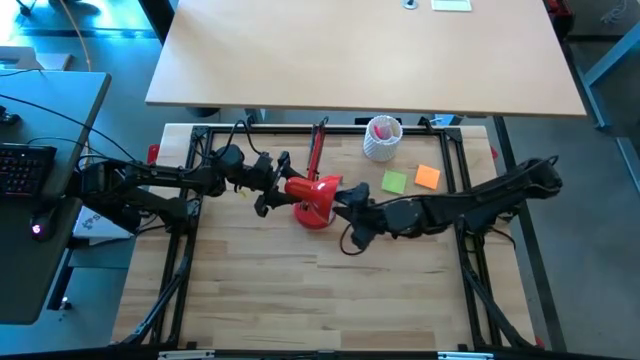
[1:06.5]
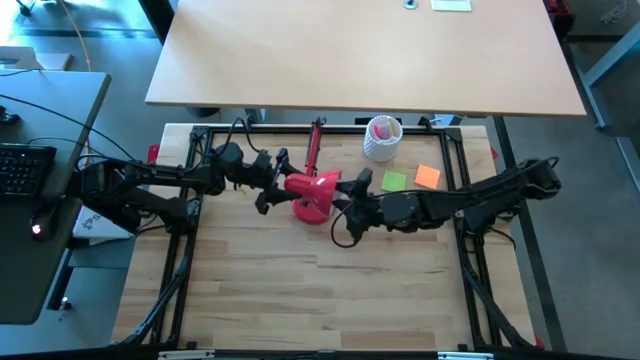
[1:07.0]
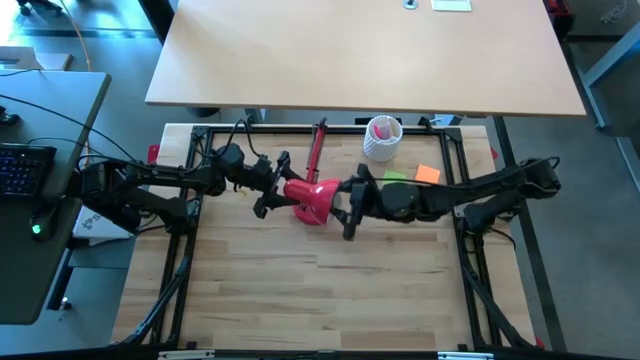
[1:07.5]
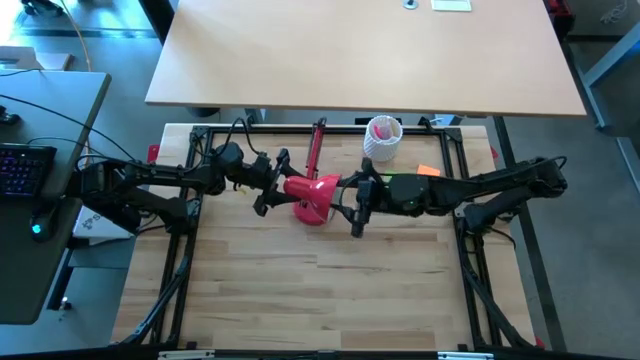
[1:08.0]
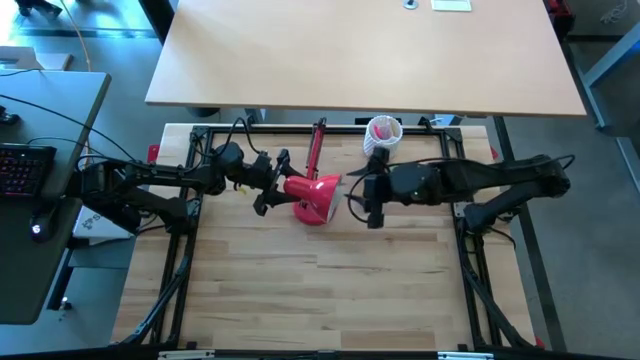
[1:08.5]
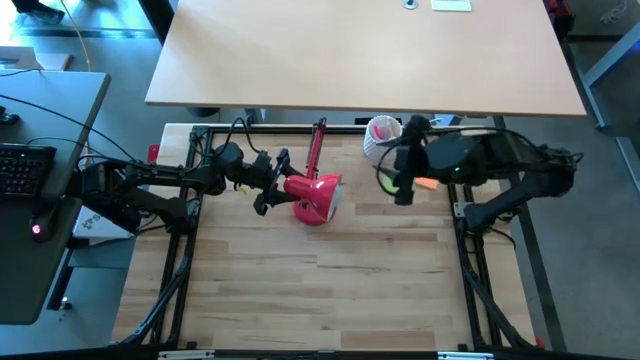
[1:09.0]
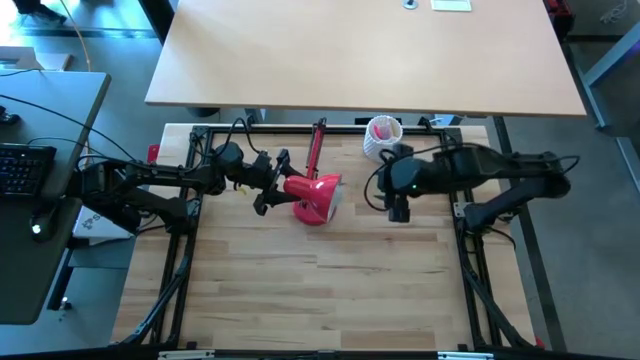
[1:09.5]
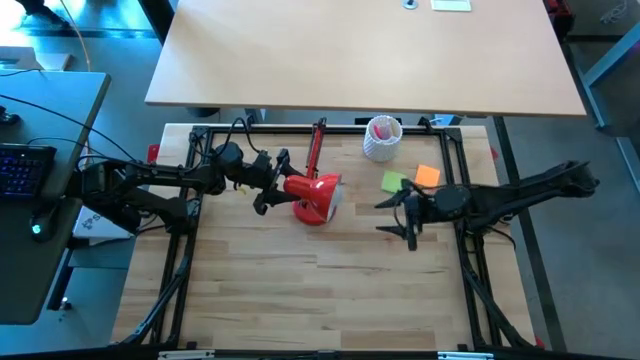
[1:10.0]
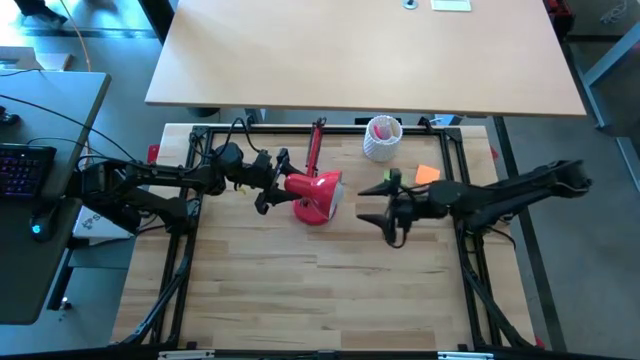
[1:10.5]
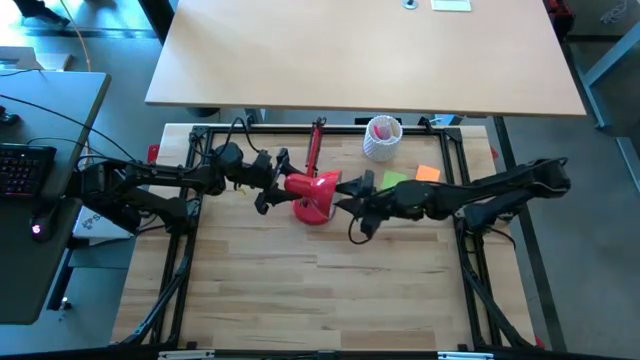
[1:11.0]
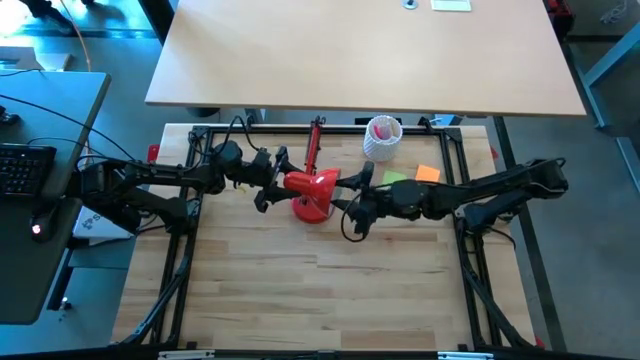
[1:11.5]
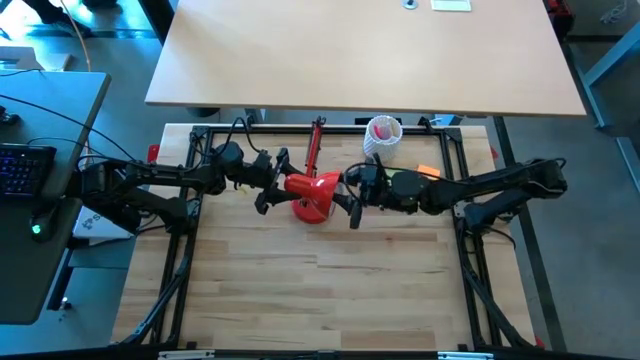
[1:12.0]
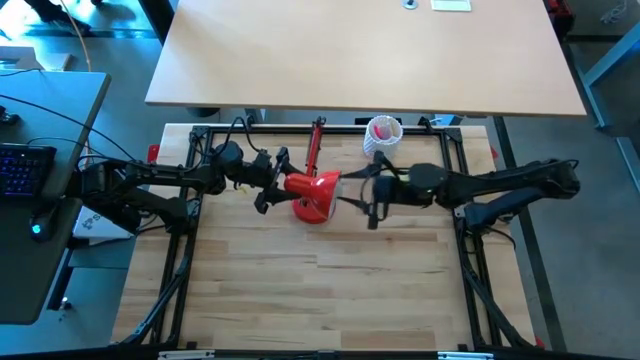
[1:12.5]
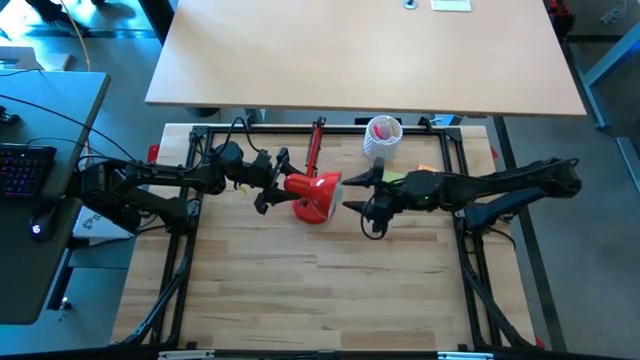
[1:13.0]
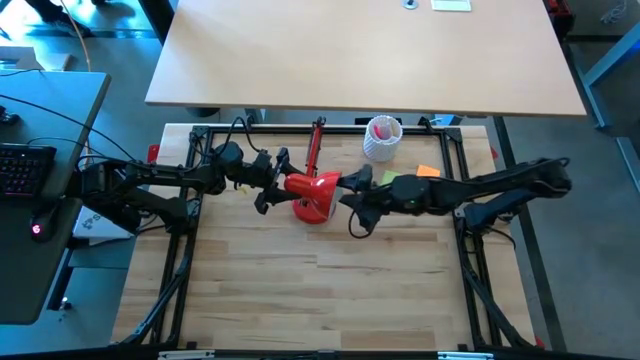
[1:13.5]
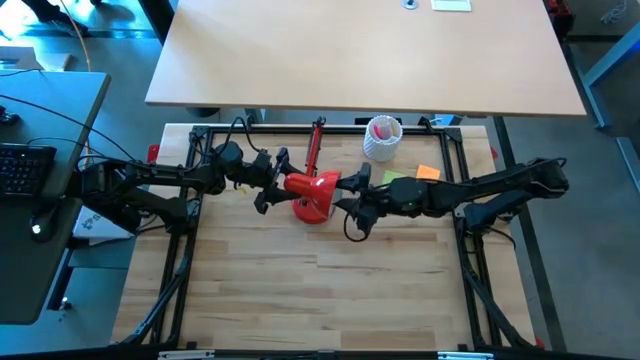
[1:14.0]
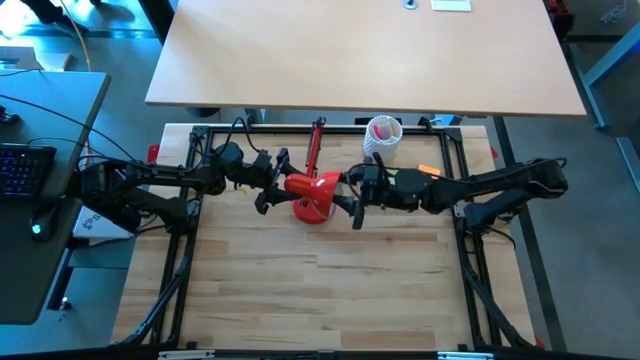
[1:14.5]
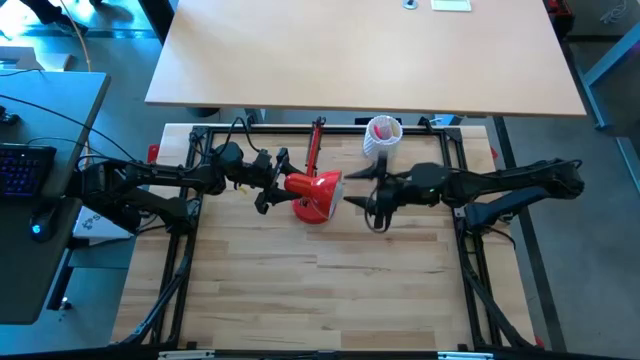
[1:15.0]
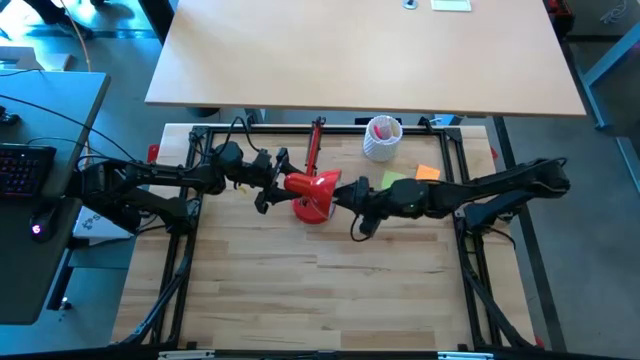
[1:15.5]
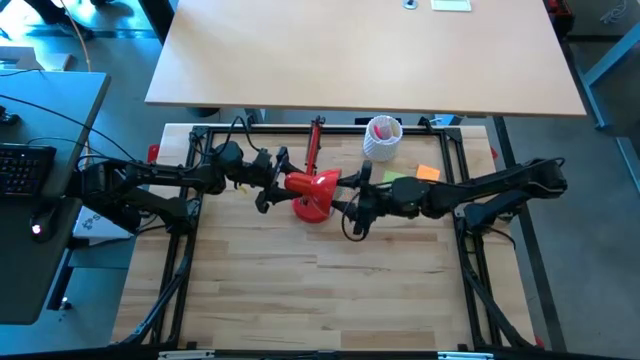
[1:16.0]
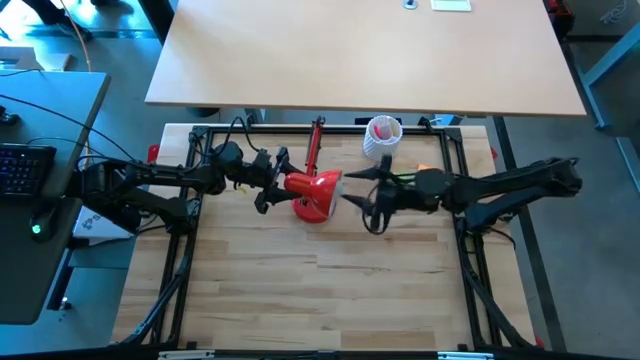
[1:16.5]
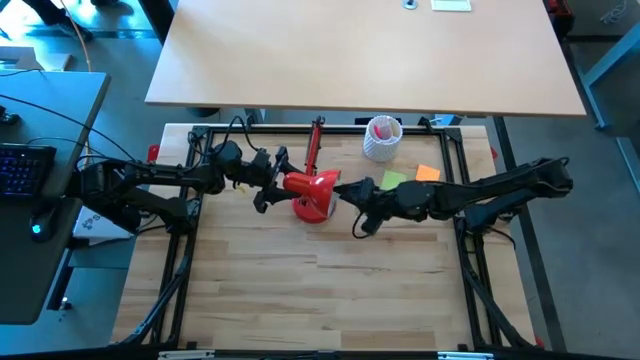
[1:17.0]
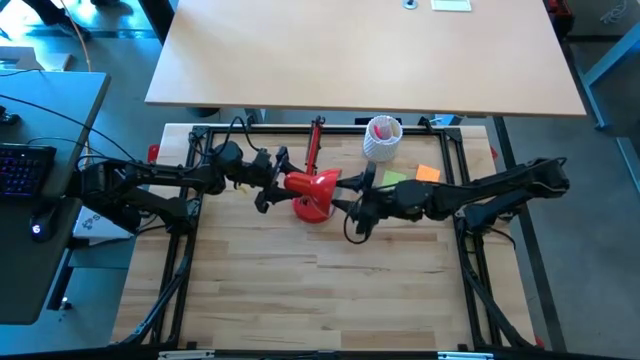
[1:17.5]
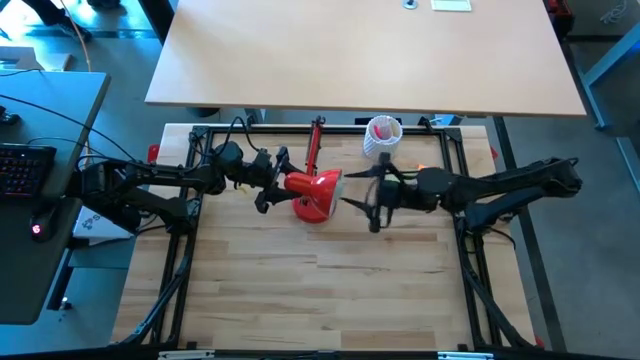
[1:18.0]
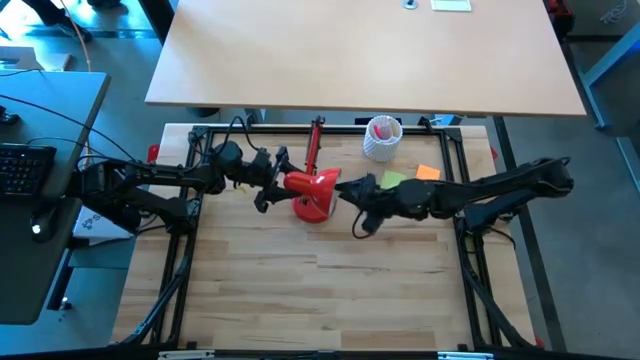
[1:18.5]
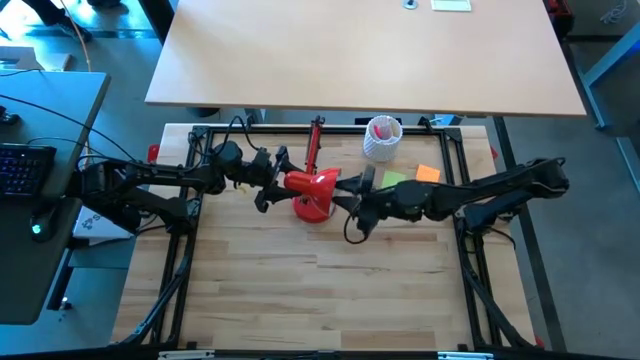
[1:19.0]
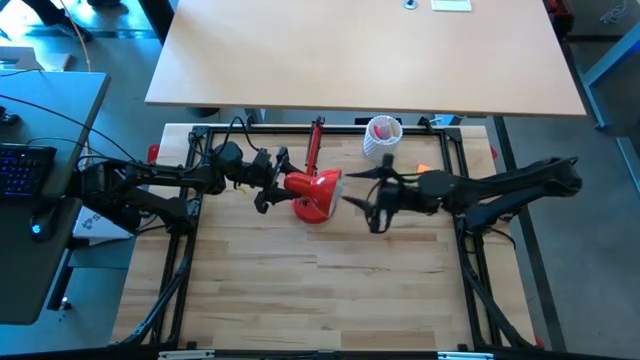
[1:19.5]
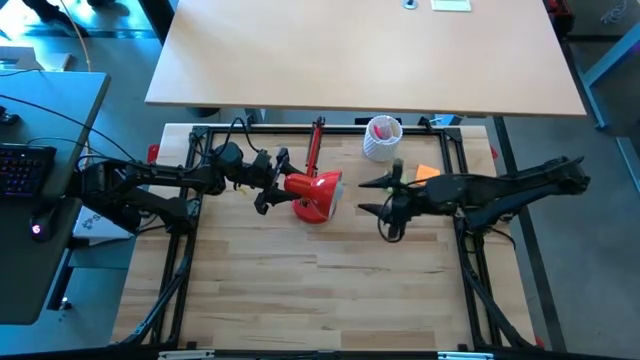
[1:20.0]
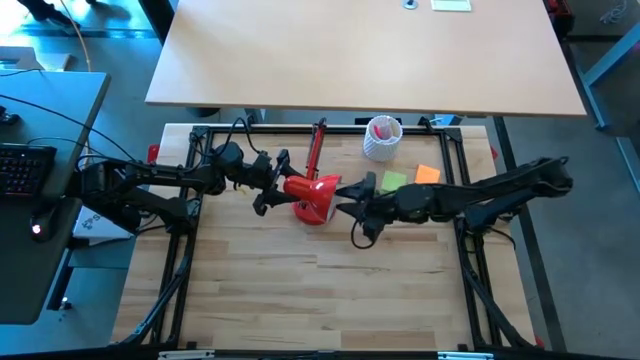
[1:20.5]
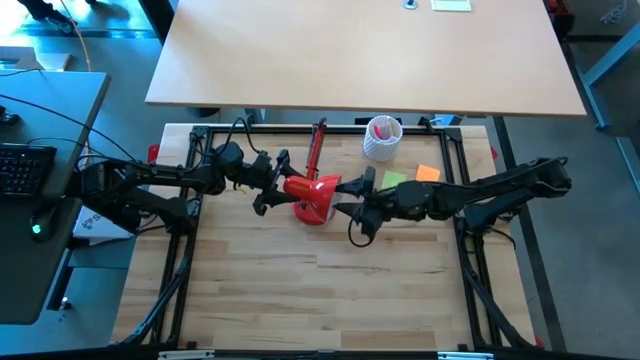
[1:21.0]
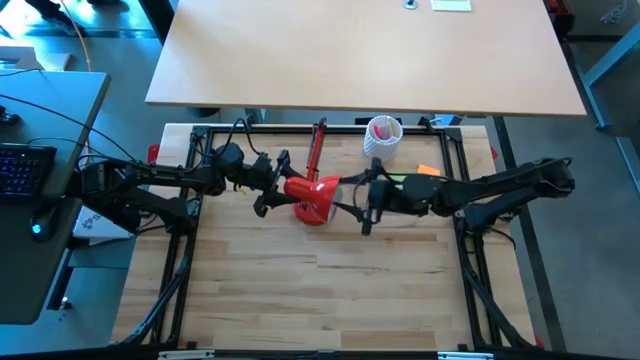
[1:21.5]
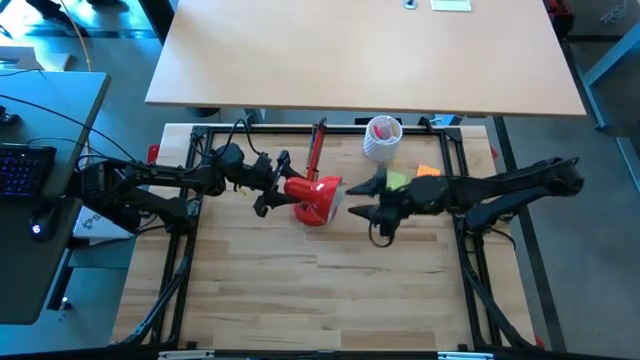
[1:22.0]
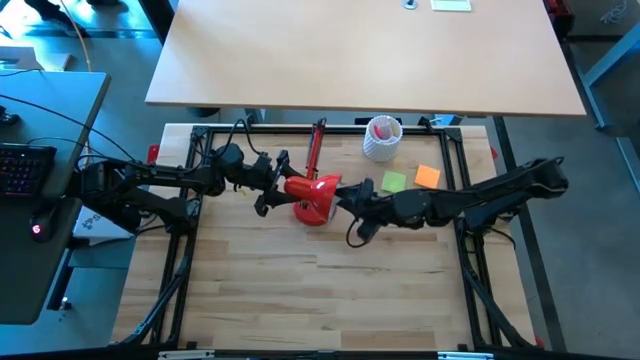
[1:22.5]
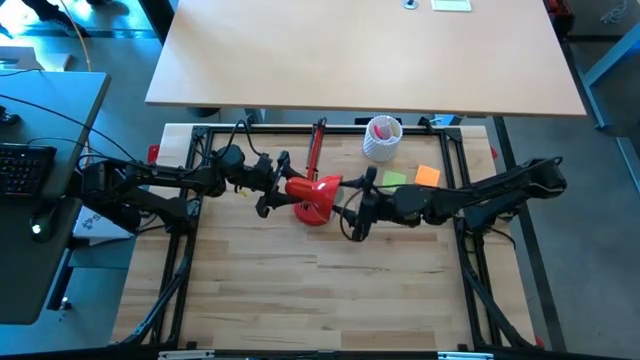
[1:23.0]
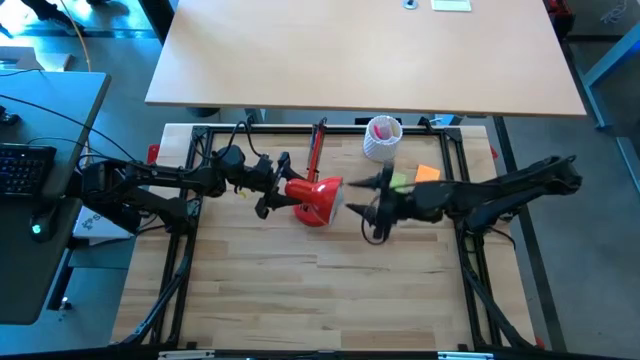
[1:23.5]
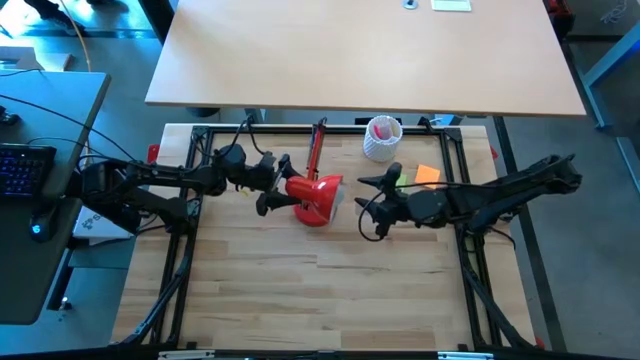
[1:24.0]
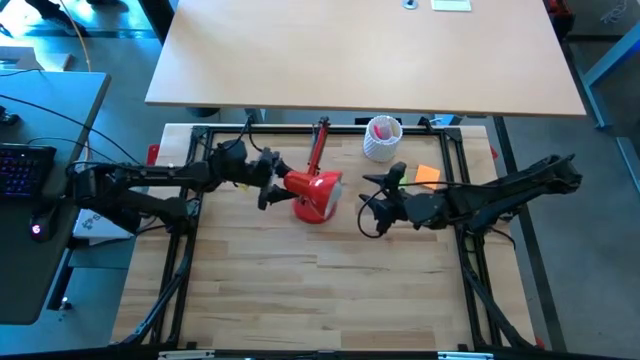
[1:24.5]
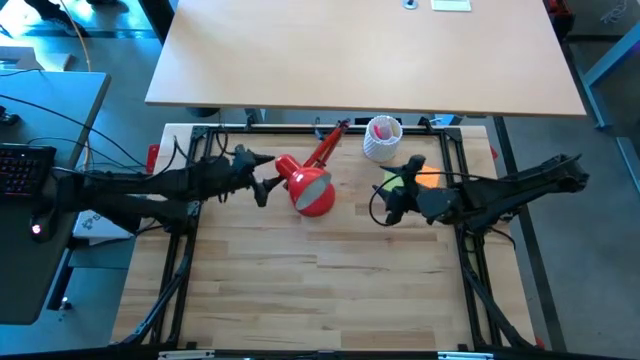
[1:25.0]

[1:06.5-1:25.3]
Task: Screw lightbulb
Insert the white lightbulb into the red lamp

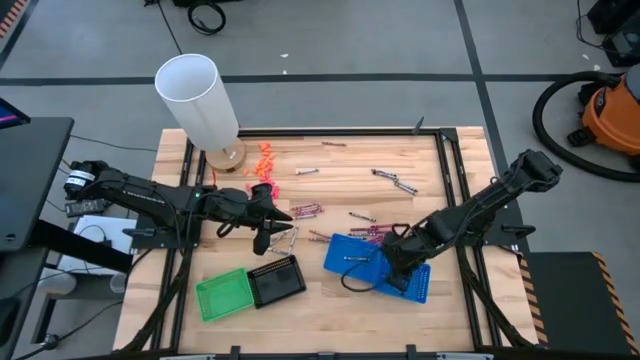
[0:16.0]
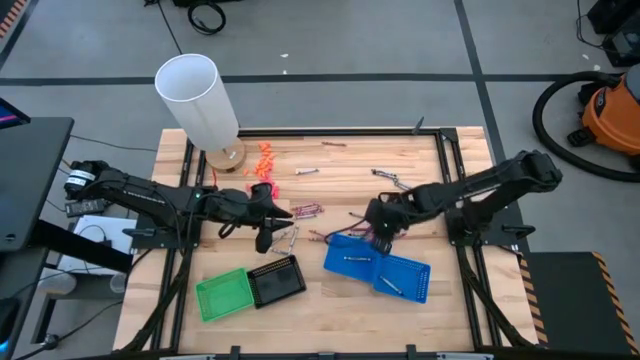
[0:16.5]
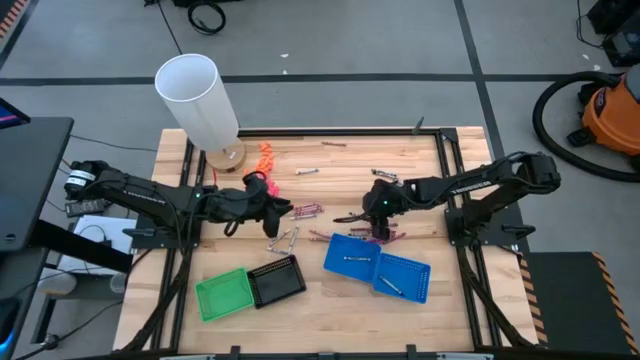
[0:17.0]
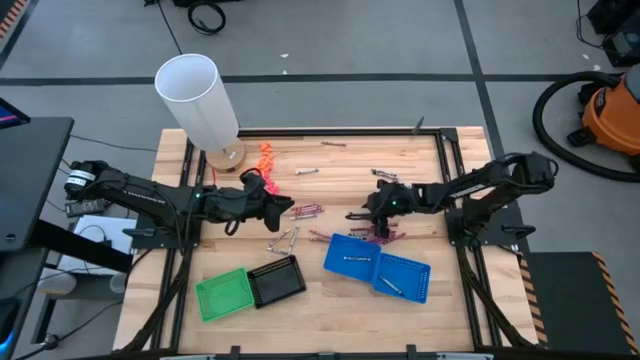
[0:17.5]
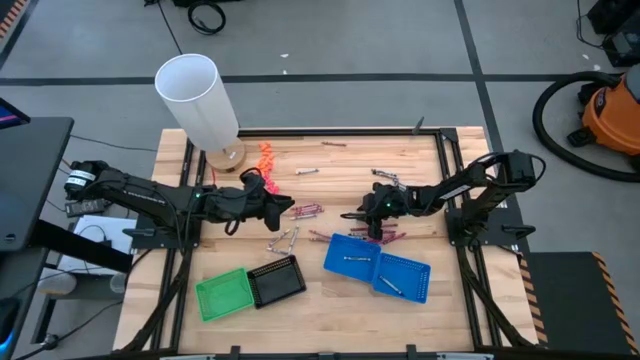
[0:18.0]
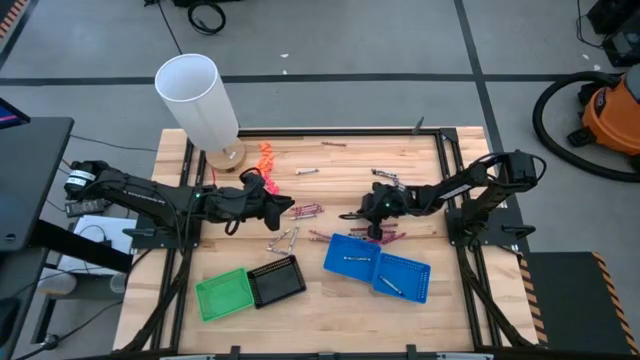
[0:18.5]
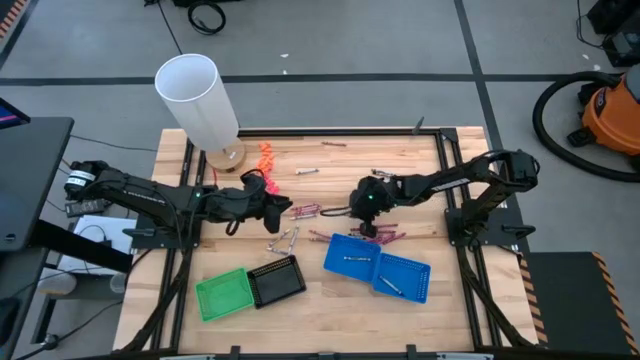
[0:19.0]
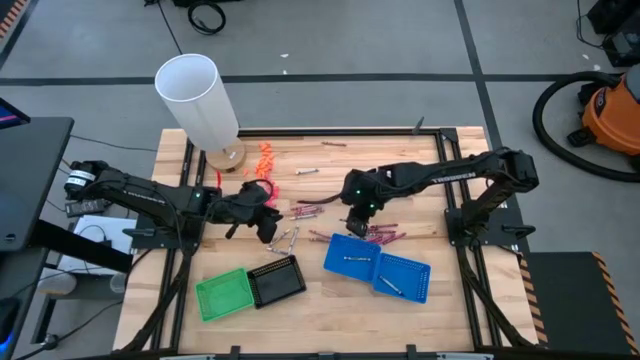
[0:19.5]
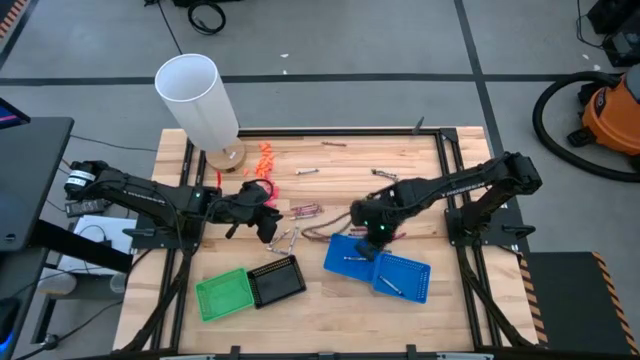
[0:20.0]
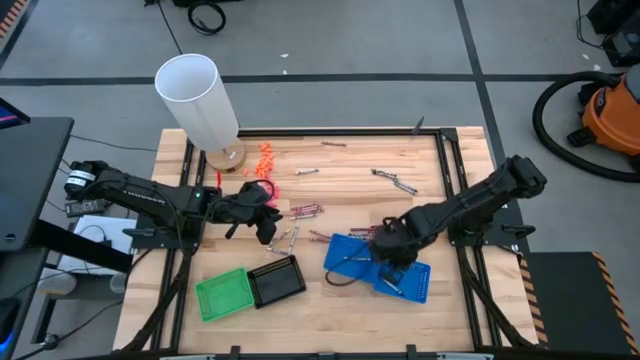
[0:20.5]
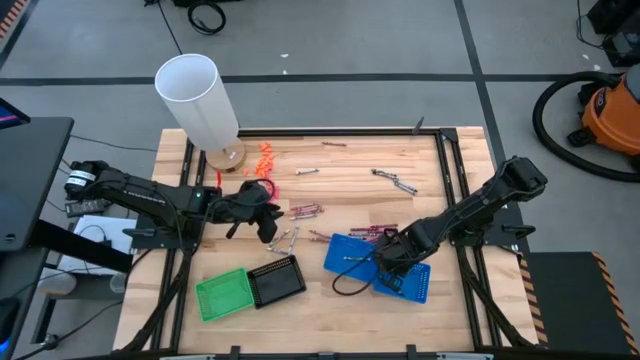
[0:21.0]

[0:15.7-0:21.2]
Task: Sort crayons
Put the black crayon into the right blue bin
